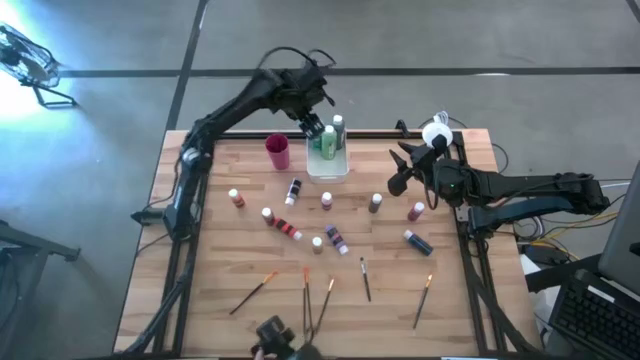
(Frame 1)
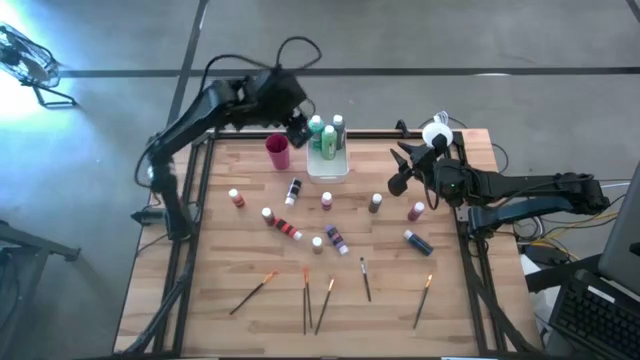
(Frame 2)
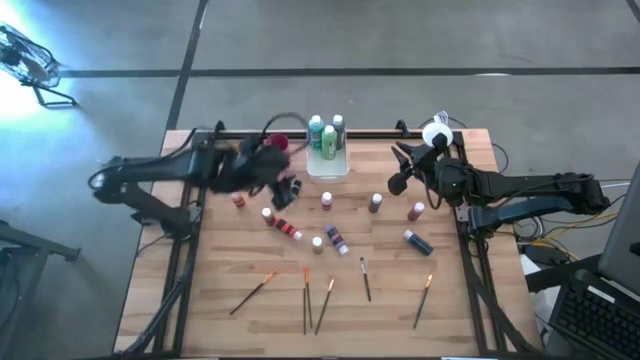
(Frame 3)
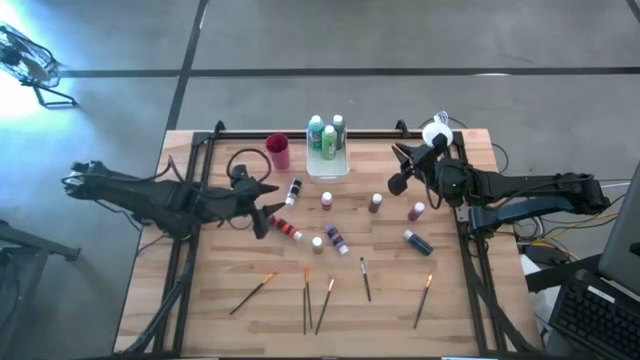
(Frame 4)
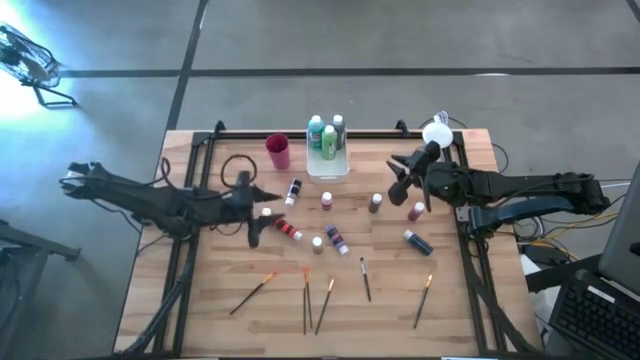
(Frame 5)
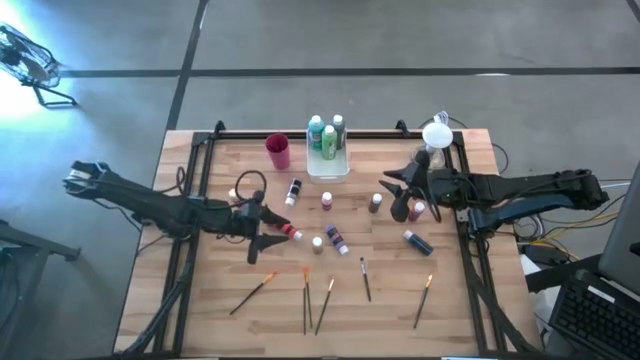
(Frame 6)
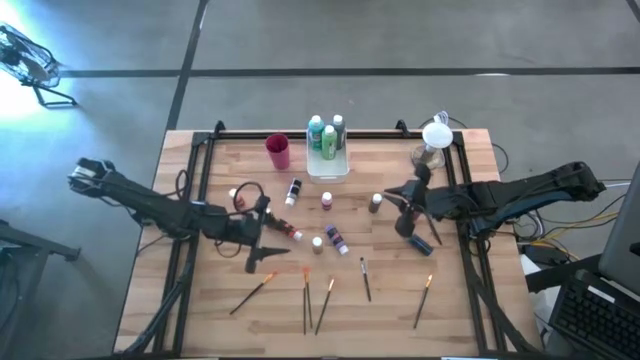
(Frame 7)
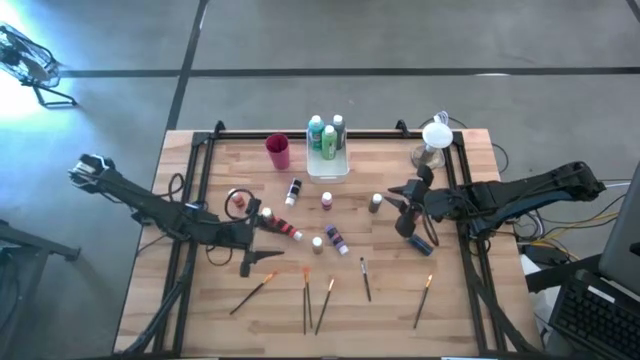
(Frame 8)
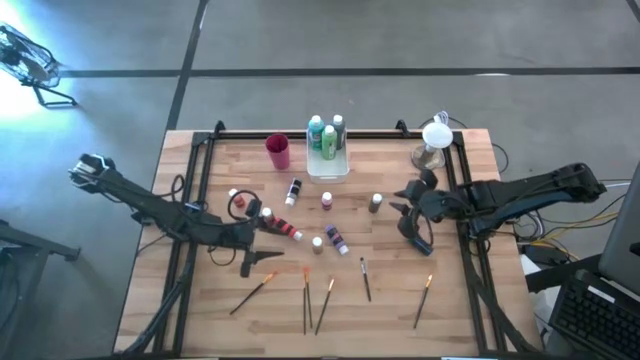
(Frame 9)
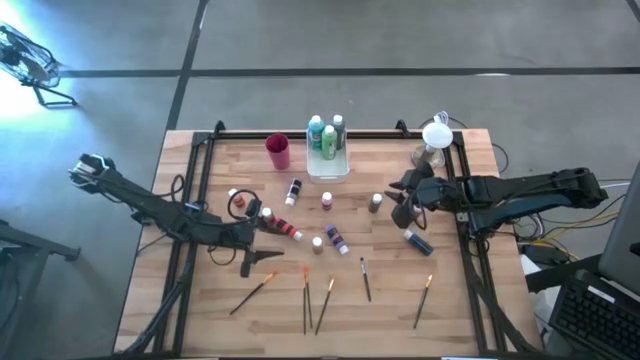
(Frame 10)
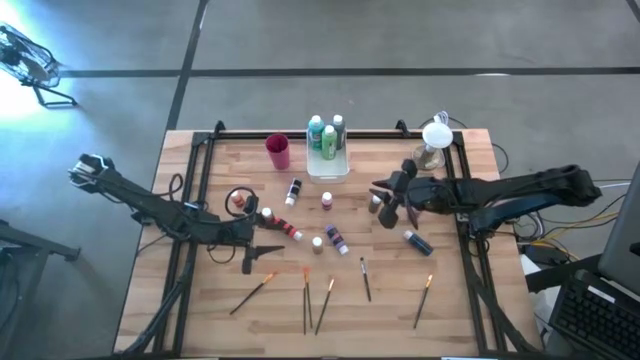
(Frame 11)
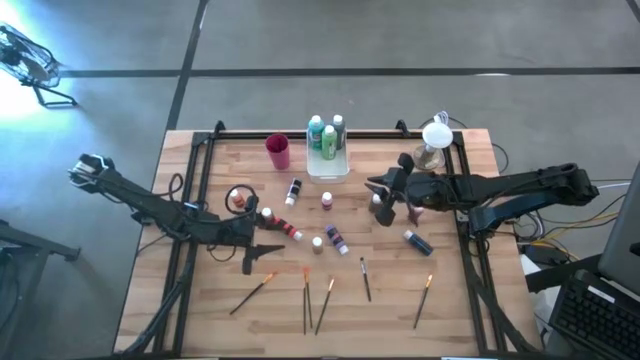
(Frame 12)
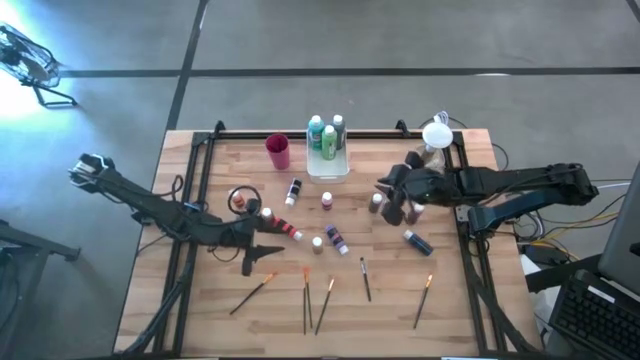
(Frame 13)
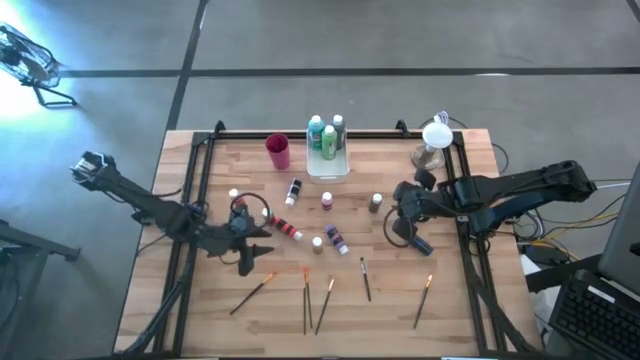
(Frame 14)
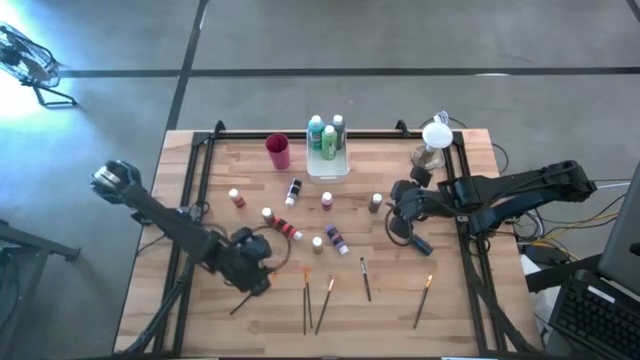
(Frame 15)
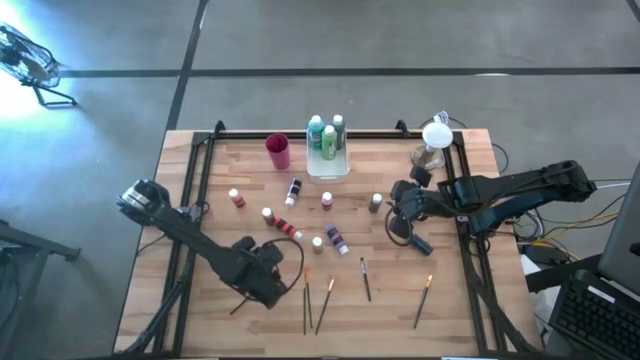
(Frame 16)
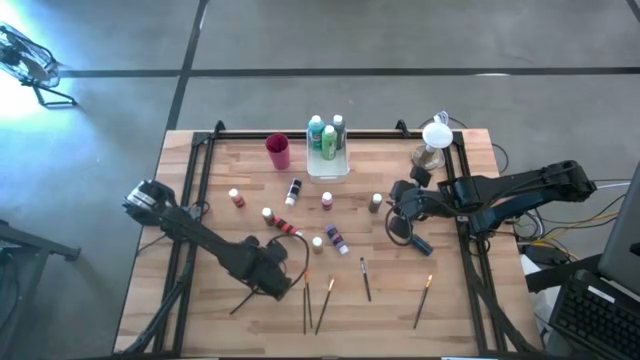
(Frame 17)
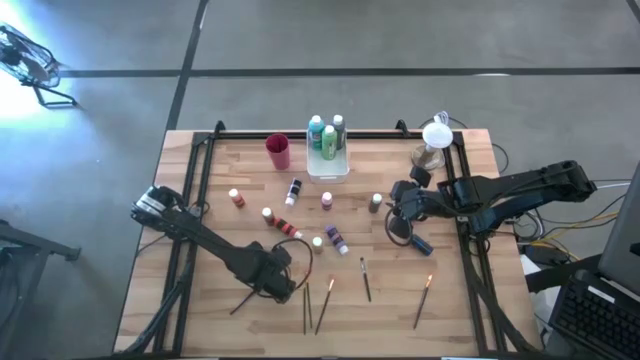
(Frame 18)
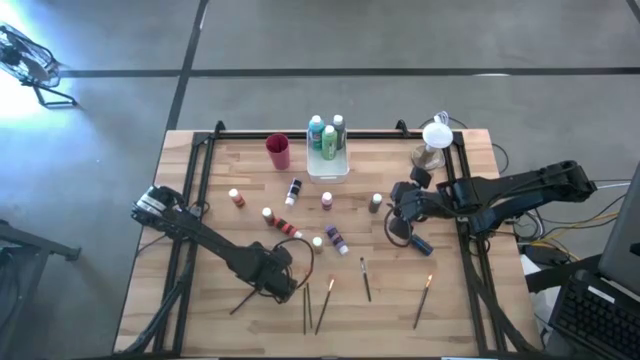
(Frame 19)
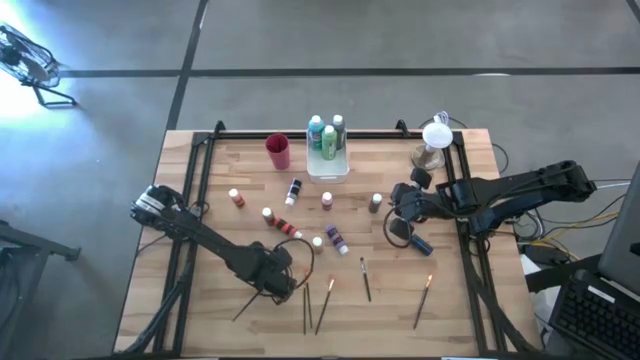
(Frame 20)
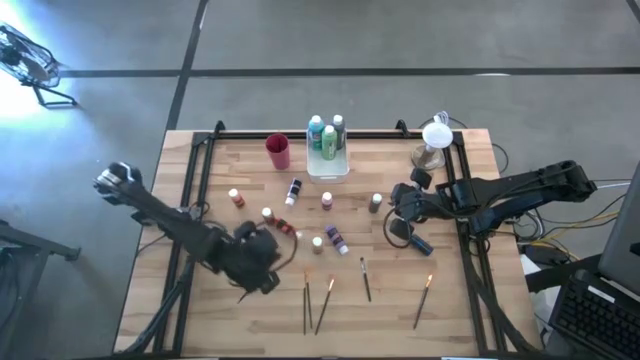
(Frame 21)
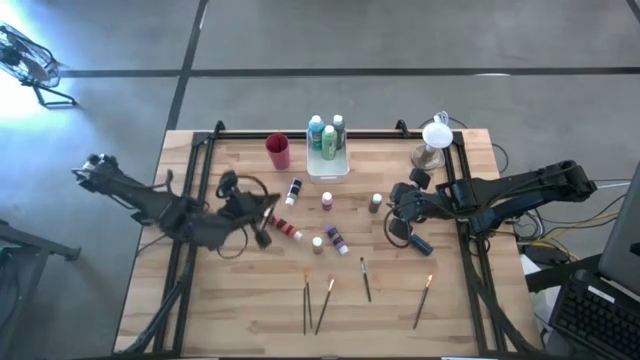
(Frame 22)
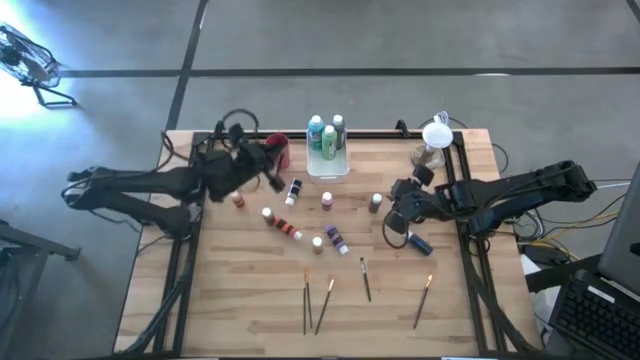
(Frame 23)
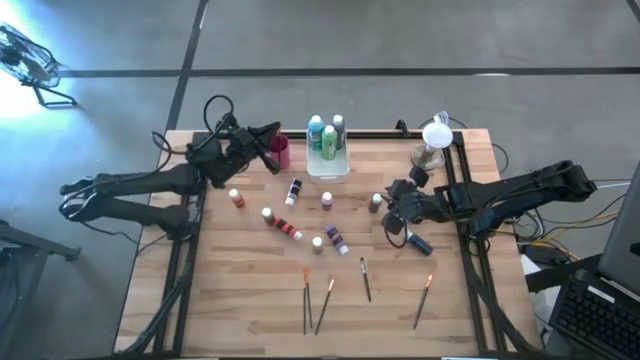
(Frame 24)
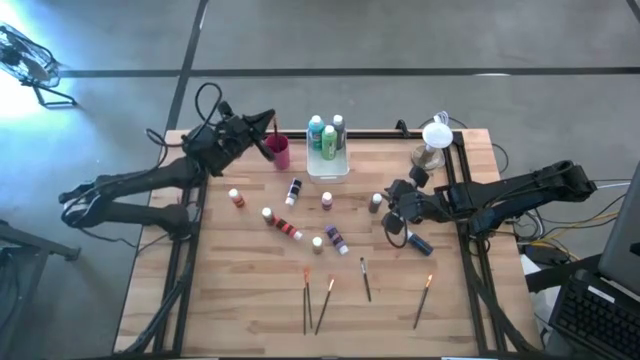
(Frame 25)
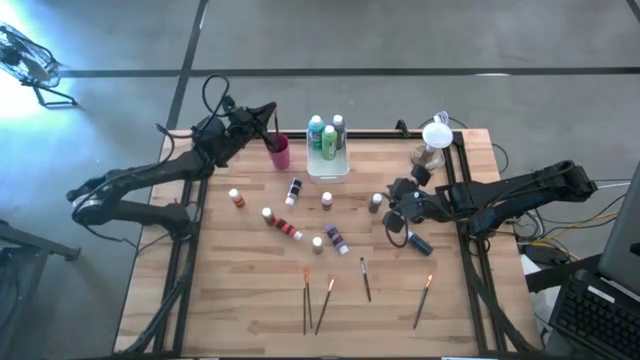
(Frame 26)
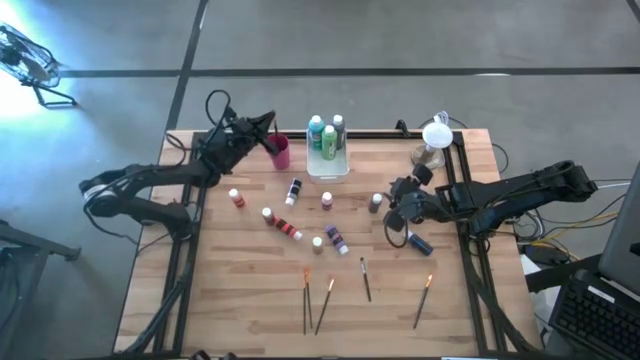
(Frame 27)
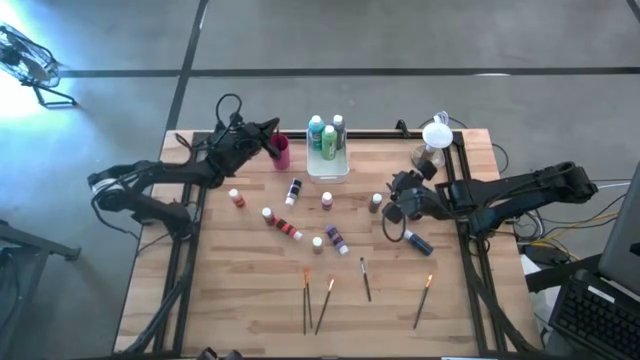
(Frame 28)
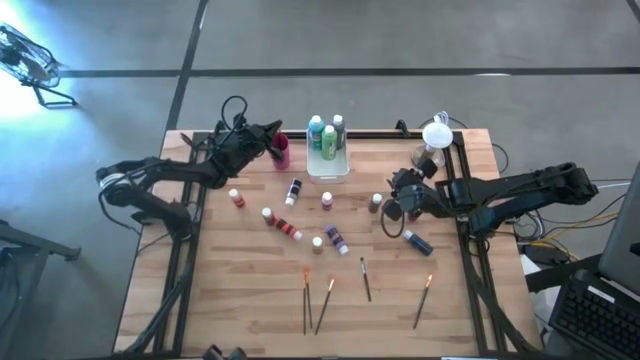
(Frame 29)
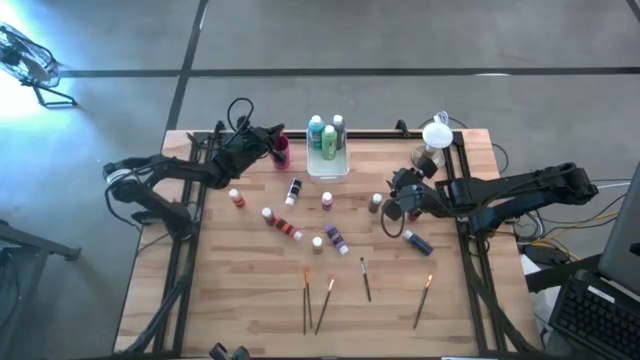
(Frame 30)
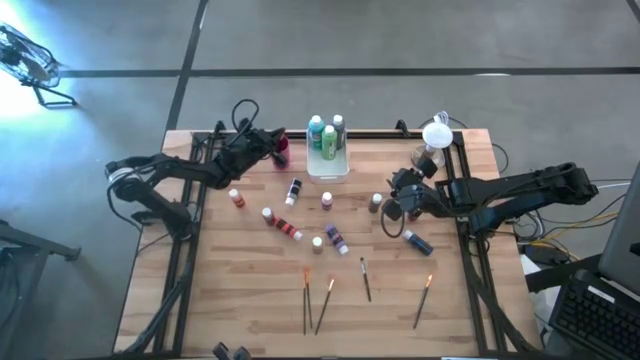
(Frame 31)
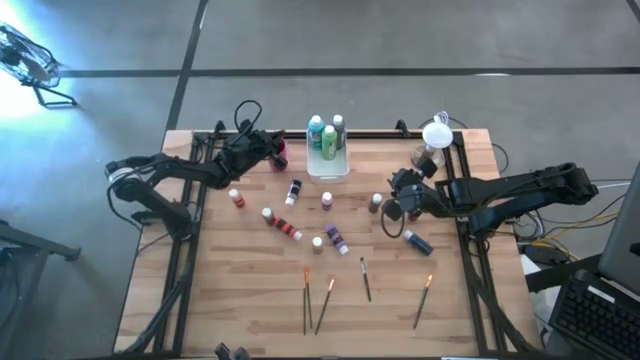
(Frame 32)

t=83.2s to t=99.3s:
Task: Pick & Place Paint Supplies
Put the gold paint brush into the pink cup
